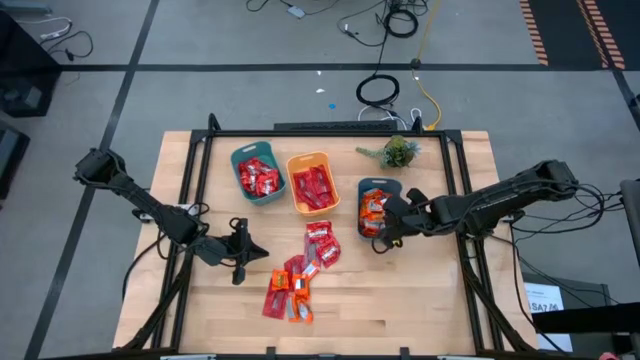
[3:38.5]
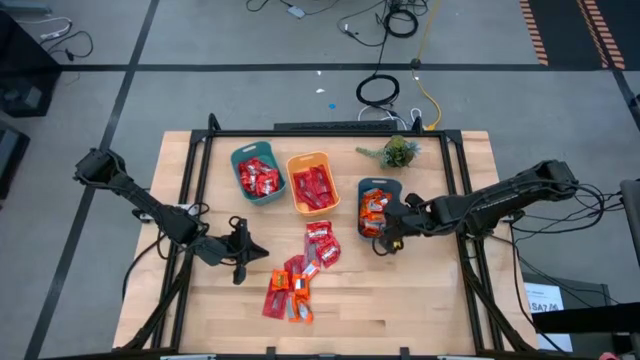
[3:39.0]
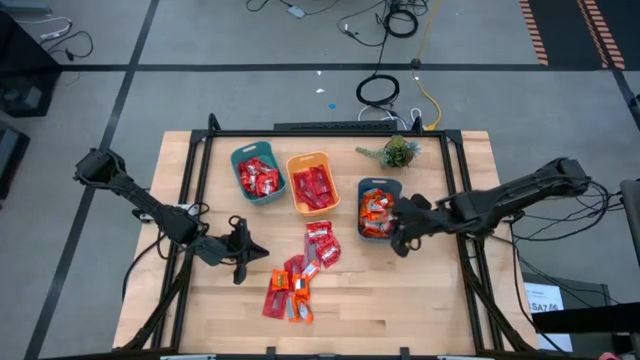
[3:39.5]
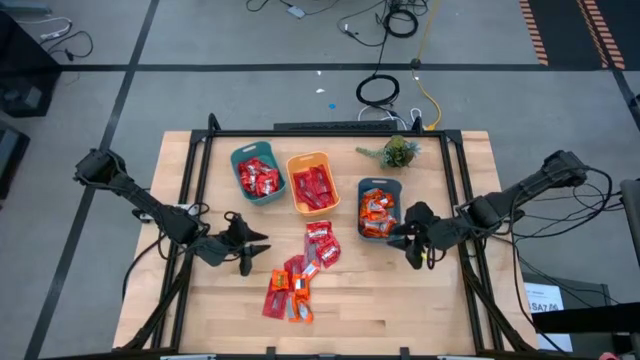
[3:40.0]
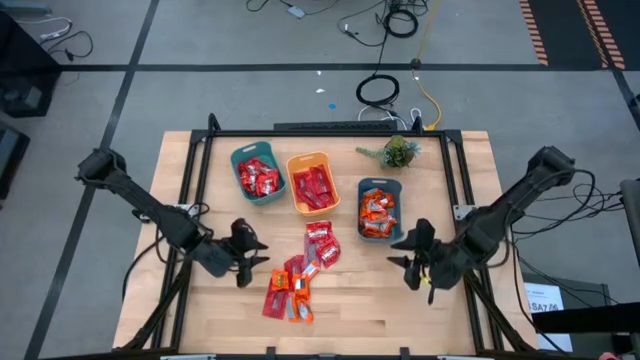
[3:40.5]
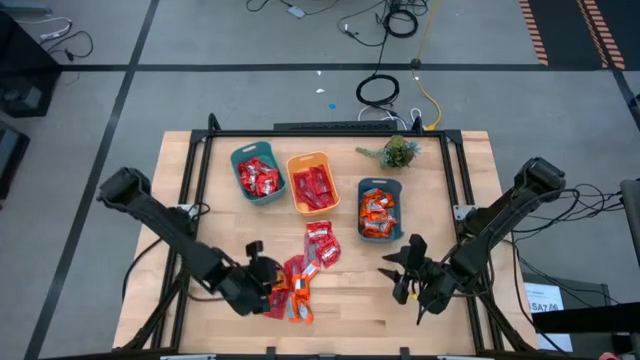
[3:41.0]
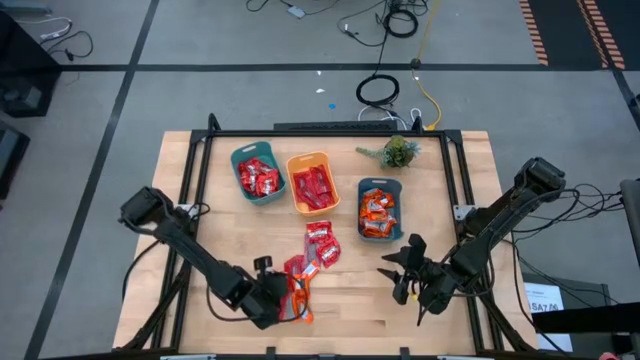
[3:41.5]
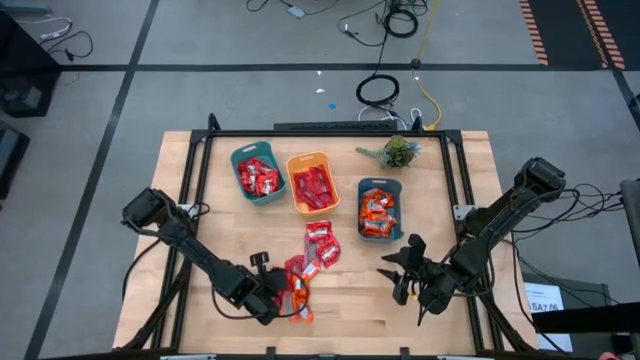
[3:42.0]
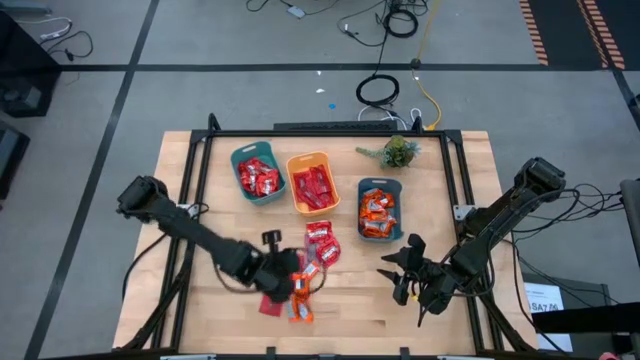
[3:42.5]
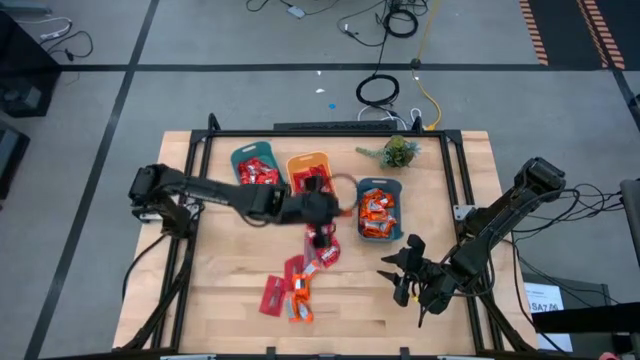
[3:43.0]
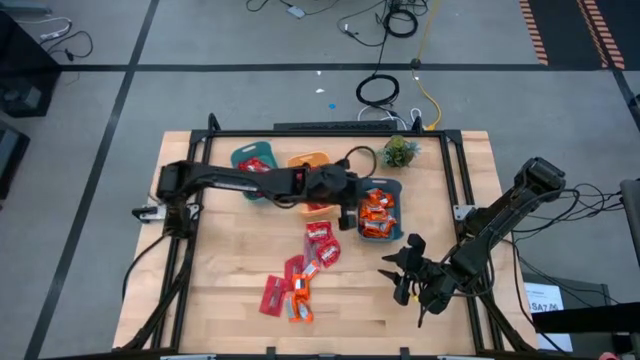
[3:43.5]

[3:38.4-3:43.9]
Task: Sort candy
Put the orange wrapper chocolate into the dark blue bin

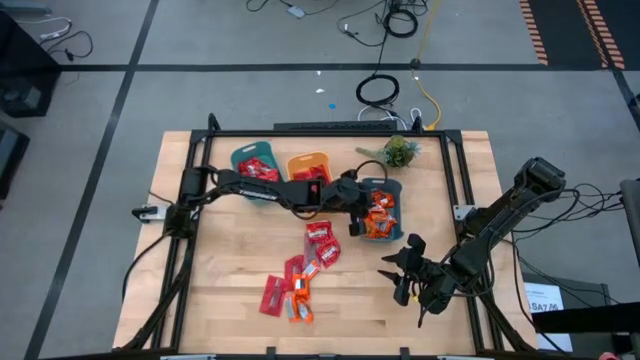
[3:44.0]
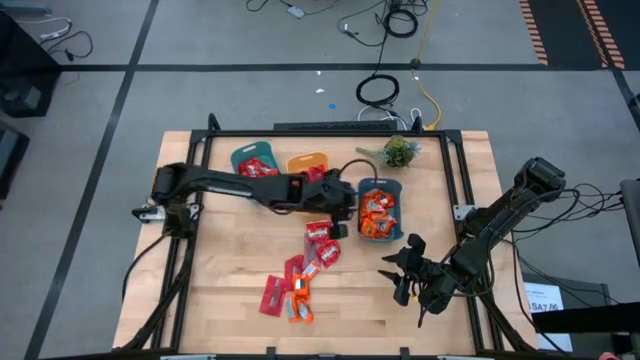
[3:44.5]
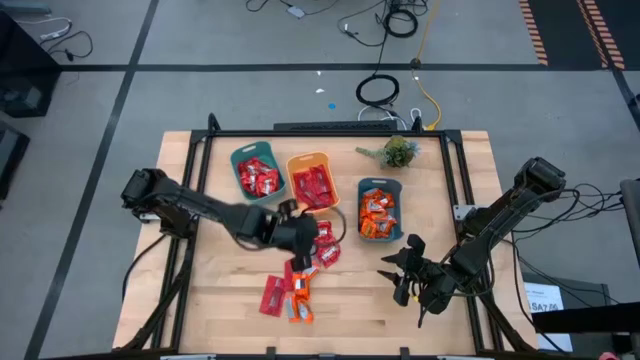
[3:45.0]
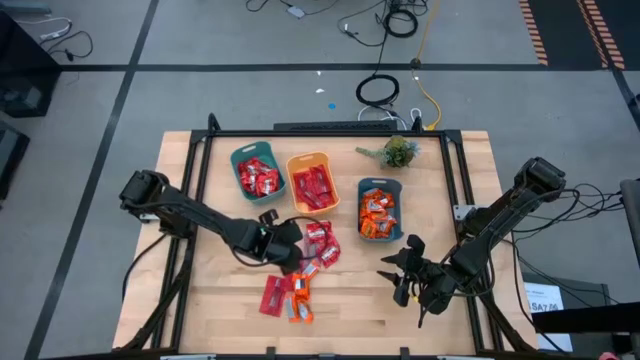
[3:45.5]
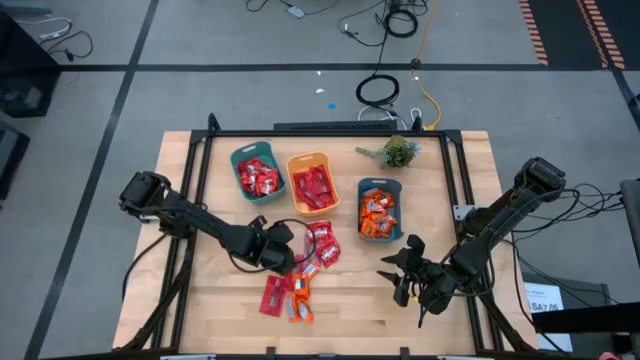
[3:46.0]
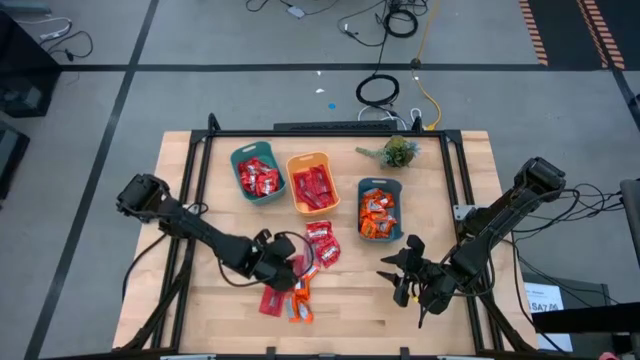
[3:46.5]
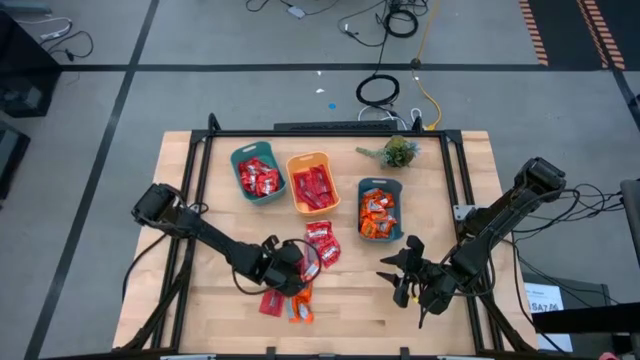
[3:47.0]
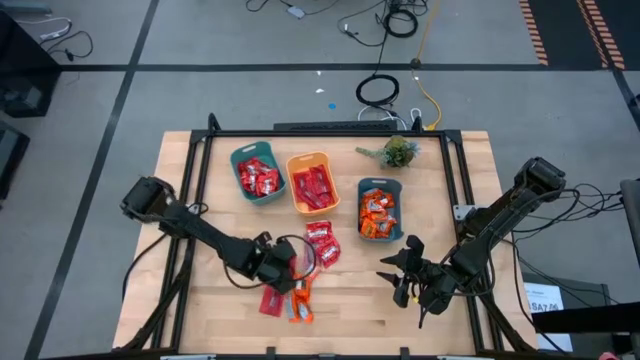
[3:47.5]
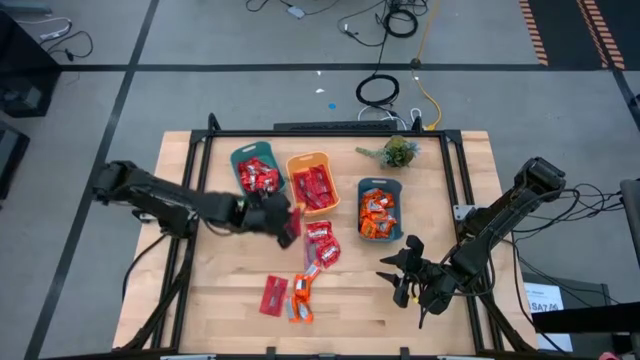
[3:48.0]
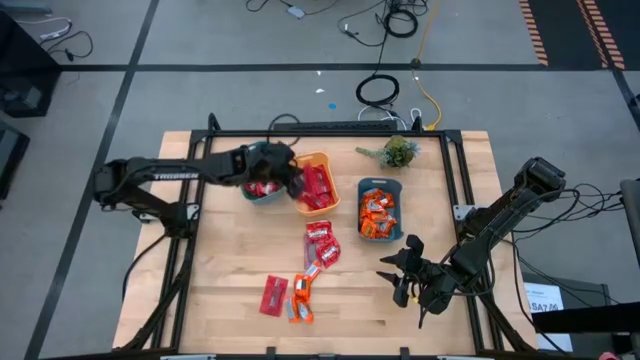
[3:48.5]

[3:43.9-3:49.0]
Put the red wrapper candy into the yellow bin

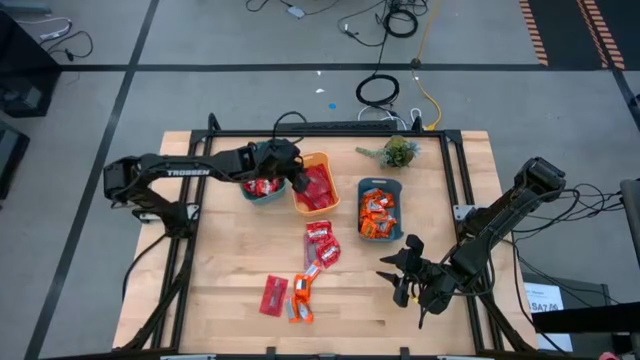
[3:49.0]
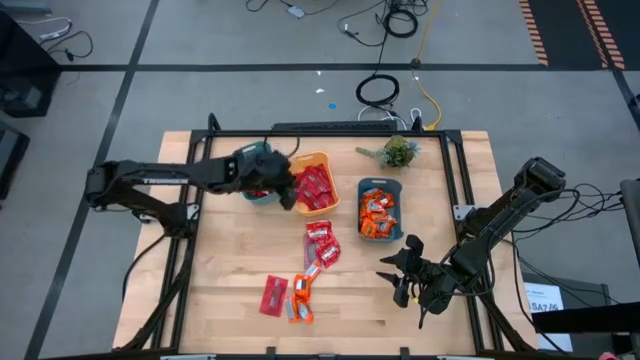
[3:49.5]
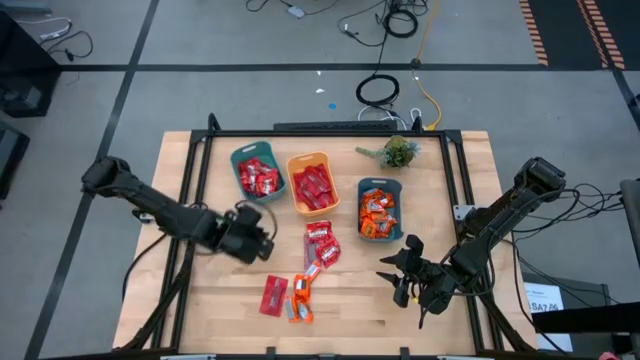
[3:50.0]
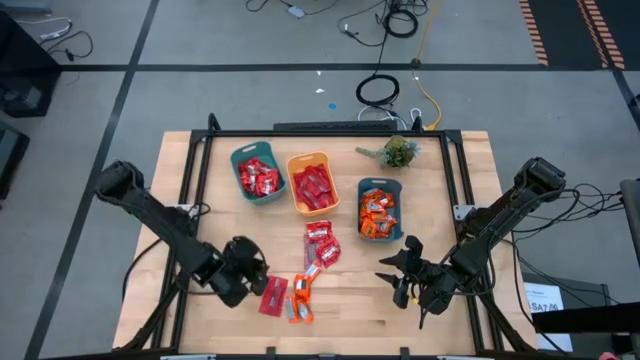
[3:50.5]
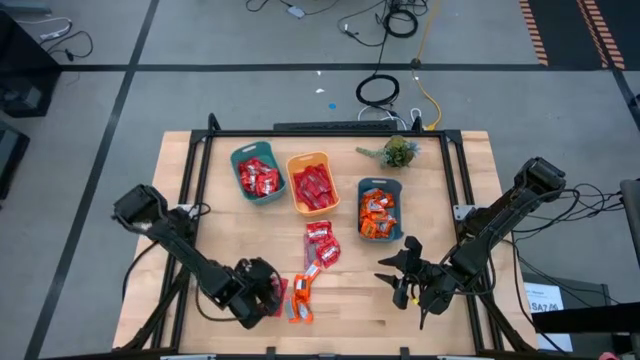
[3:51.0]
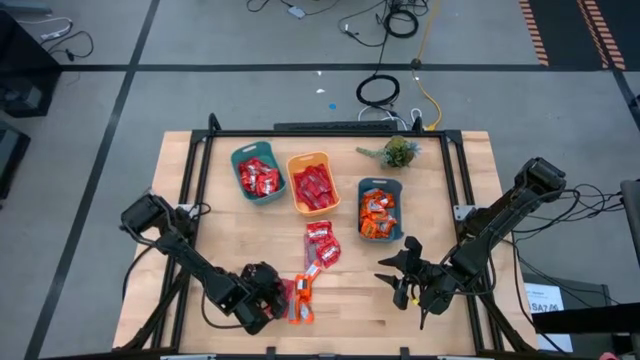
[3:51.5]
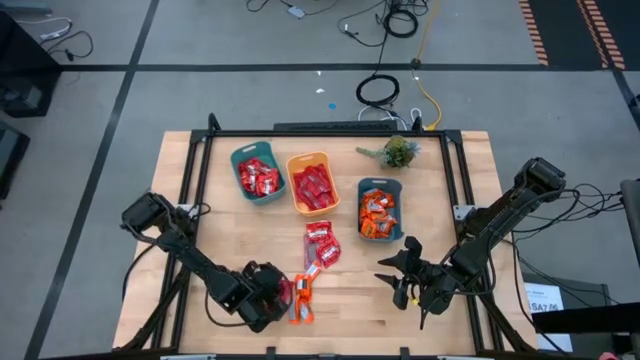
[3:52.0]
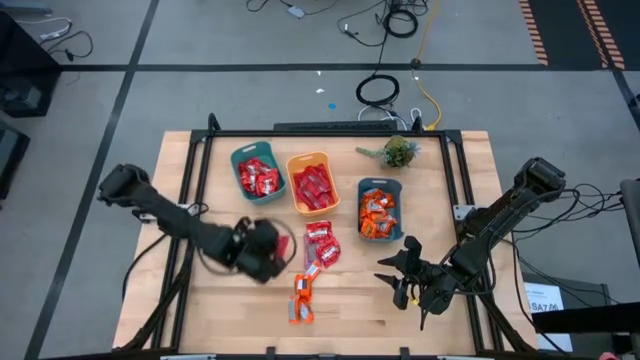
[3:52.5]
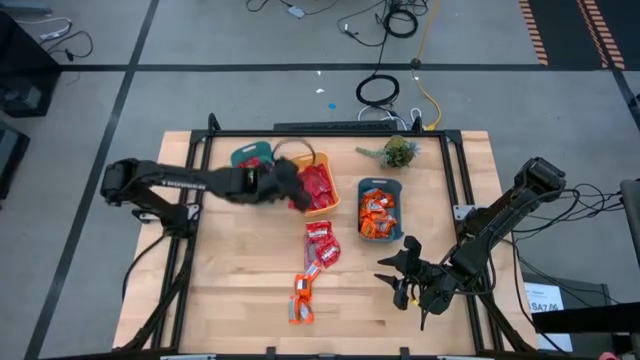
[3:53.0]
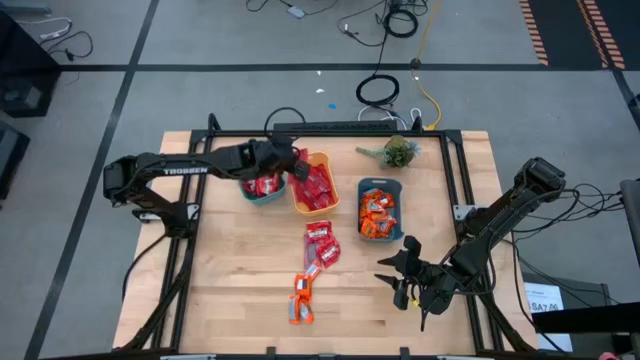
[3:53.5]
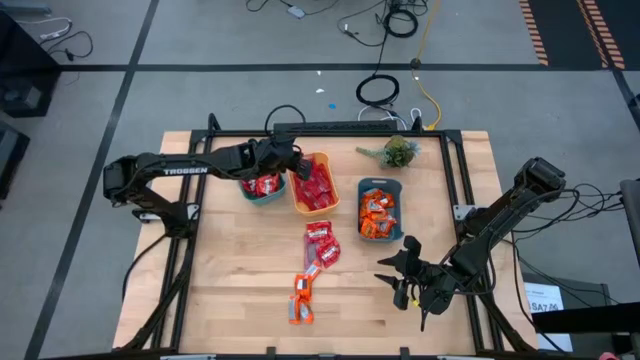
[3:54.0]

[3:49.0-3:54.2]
Put the red wrapper candy into the yellow bin

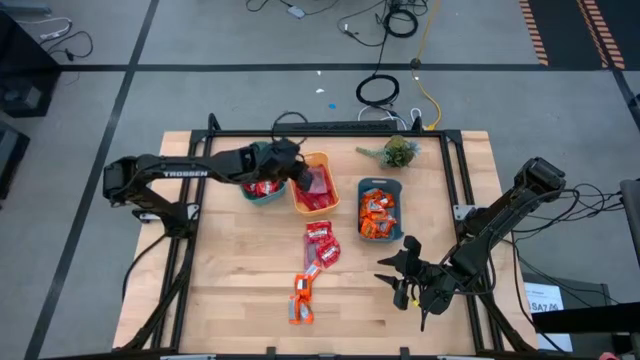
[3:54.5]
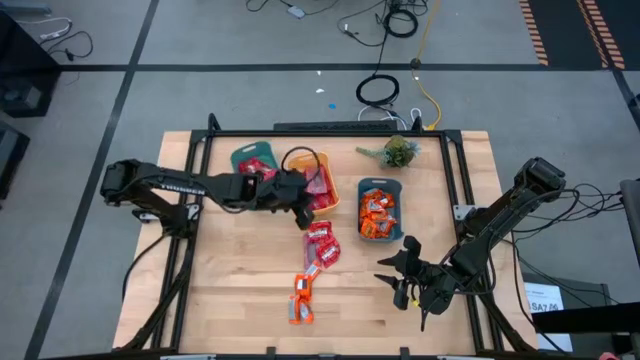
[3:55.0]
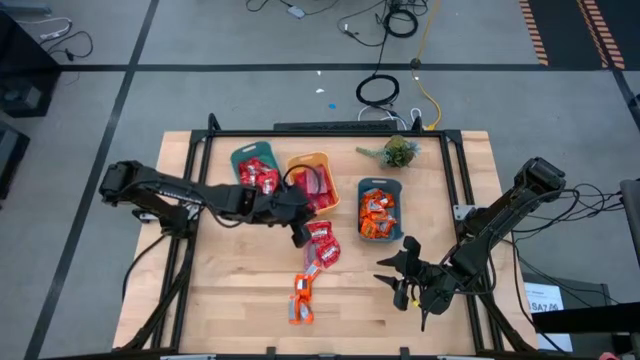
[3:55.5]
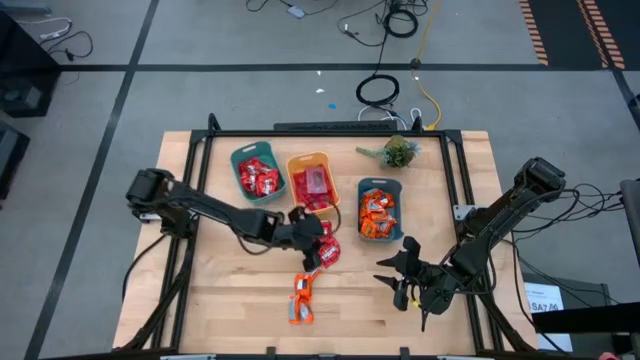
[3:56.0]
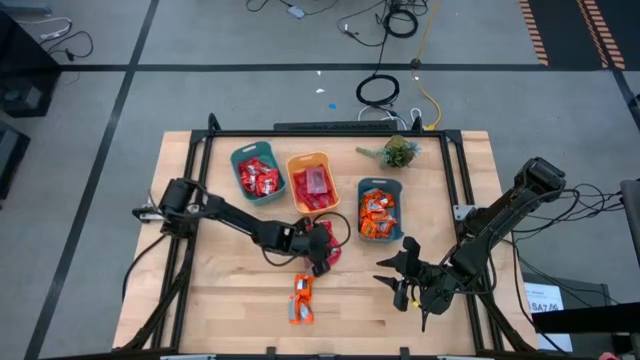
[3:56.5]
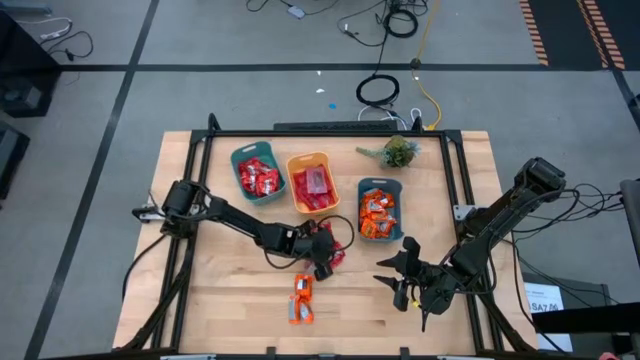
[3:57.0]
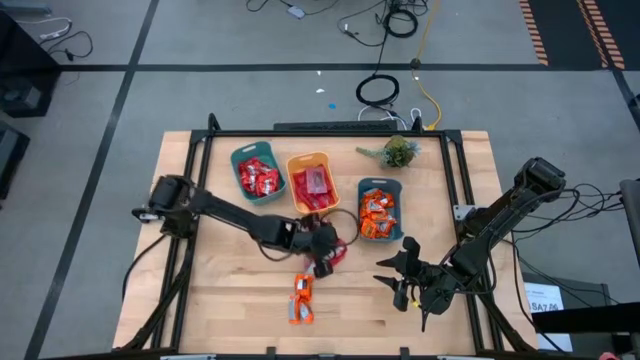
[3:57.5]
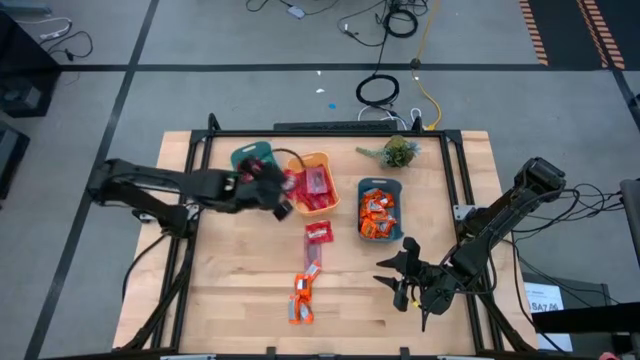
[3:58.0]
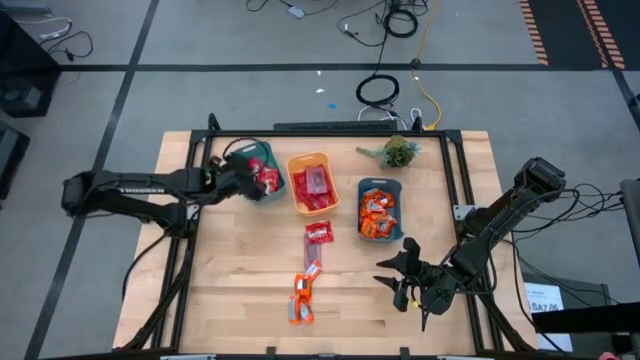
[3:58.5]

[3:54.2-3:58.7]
Put the red pack of candy into the light blue bin
